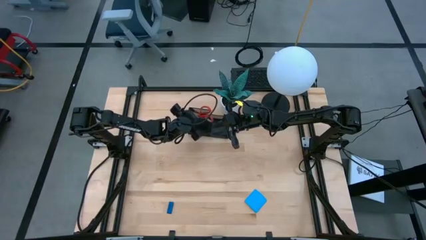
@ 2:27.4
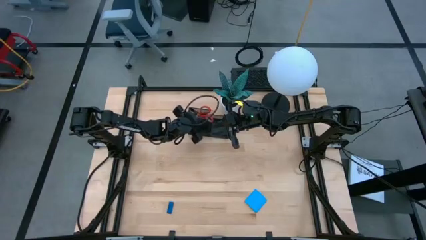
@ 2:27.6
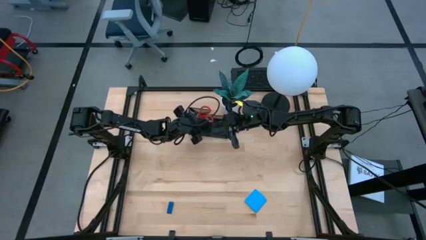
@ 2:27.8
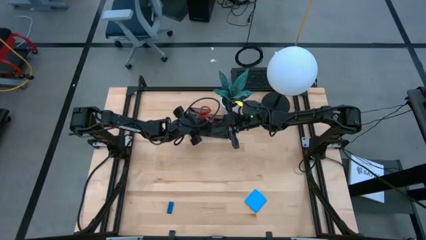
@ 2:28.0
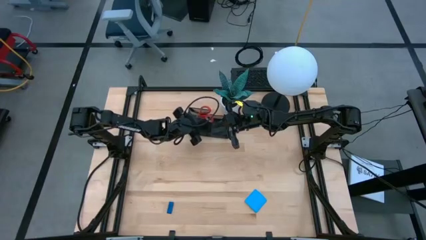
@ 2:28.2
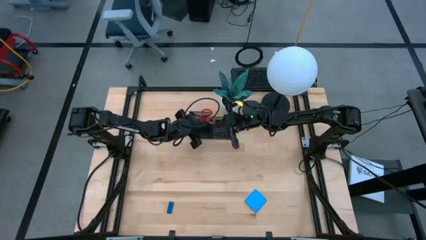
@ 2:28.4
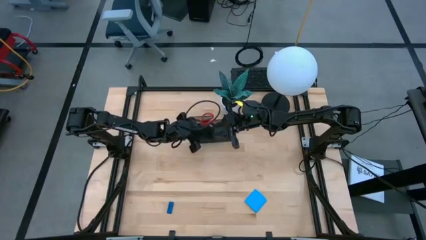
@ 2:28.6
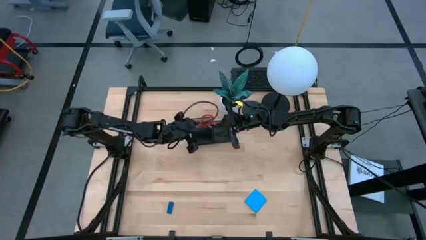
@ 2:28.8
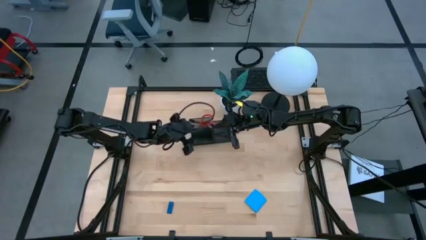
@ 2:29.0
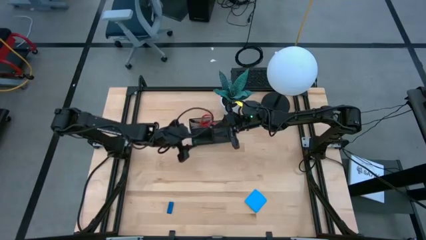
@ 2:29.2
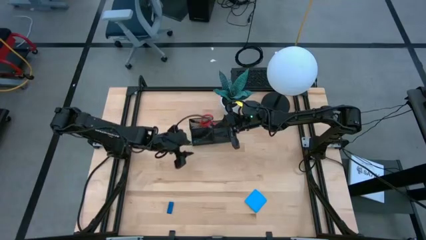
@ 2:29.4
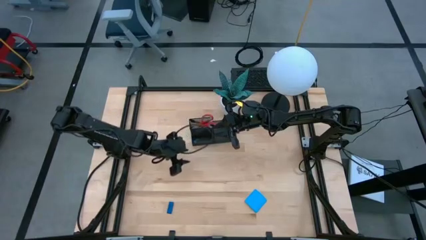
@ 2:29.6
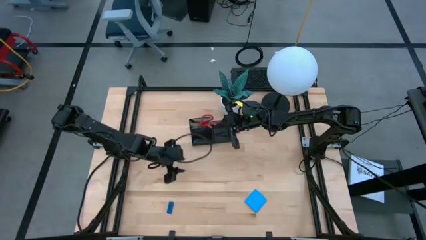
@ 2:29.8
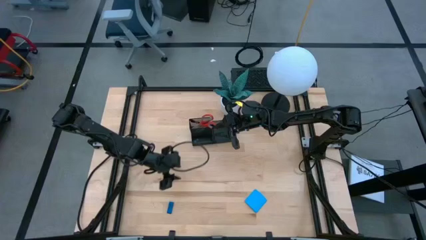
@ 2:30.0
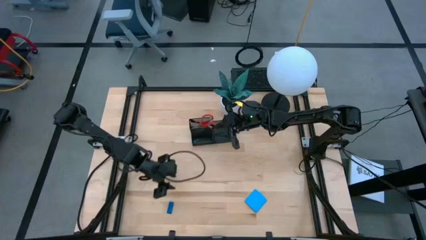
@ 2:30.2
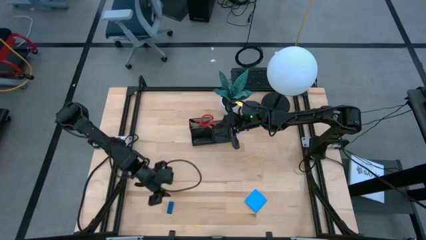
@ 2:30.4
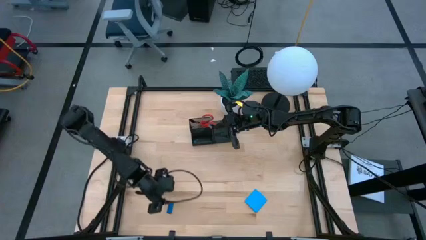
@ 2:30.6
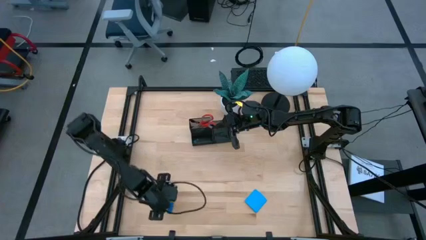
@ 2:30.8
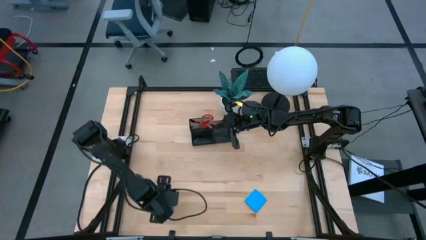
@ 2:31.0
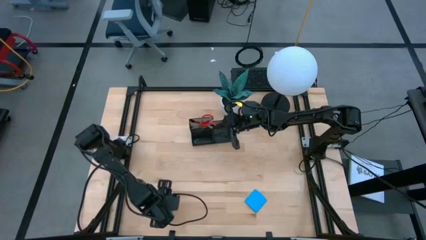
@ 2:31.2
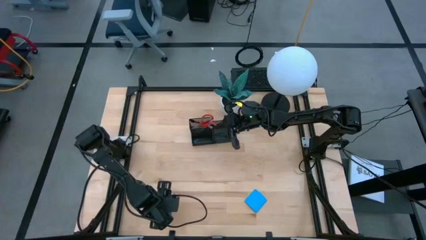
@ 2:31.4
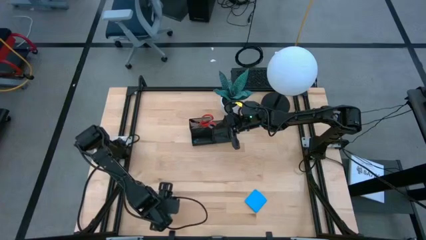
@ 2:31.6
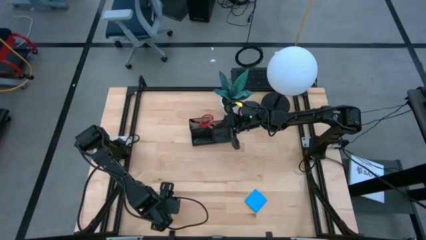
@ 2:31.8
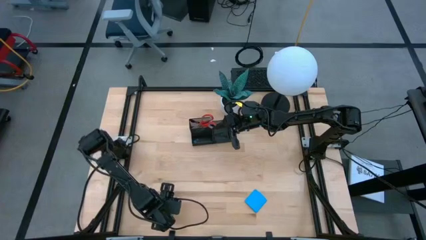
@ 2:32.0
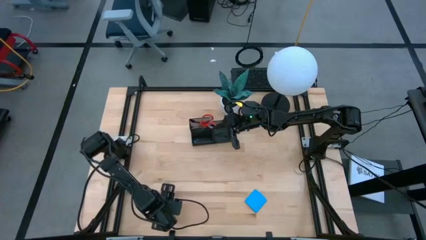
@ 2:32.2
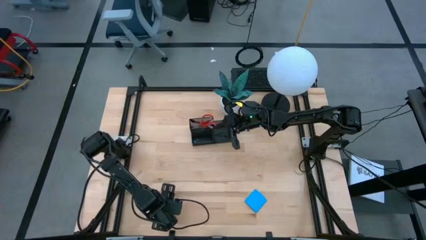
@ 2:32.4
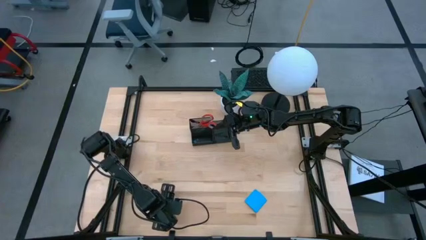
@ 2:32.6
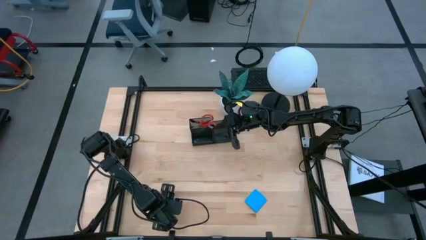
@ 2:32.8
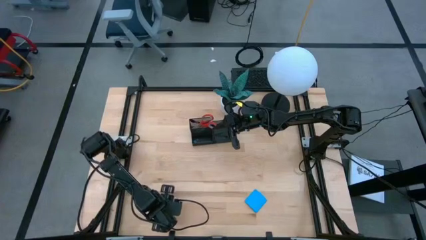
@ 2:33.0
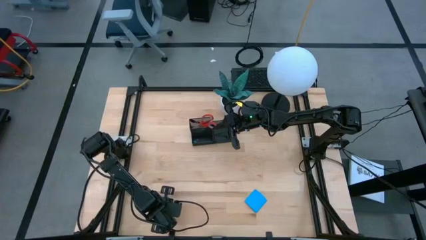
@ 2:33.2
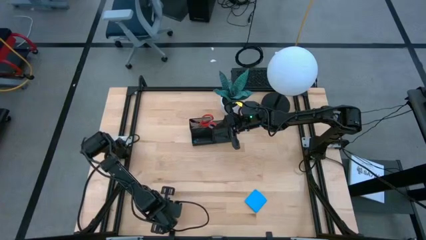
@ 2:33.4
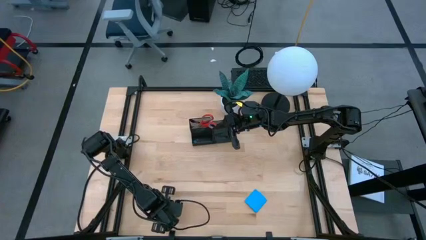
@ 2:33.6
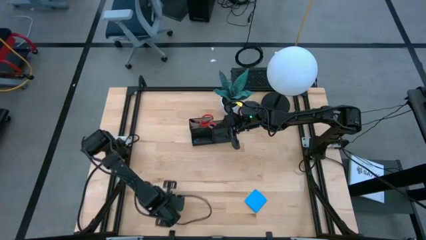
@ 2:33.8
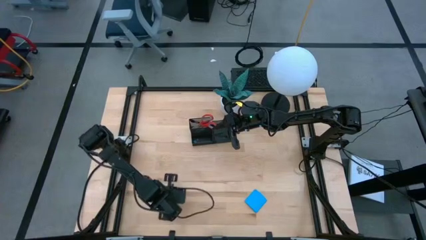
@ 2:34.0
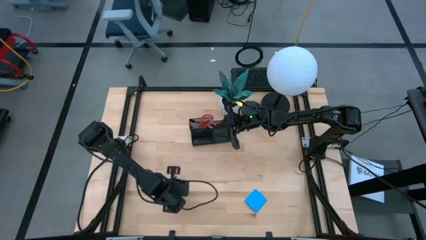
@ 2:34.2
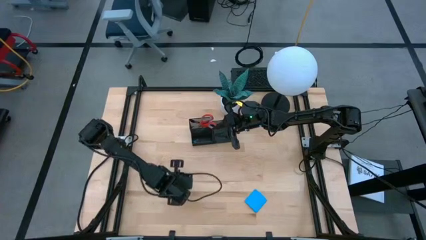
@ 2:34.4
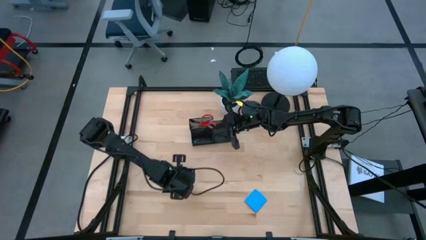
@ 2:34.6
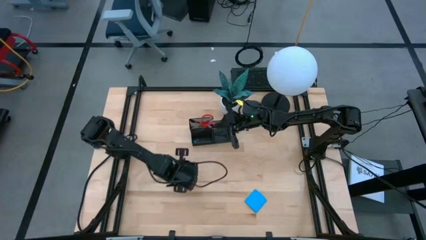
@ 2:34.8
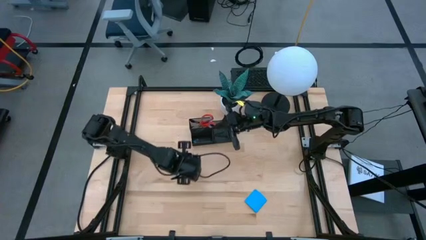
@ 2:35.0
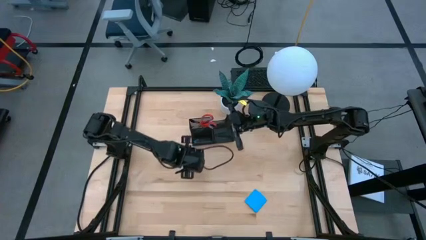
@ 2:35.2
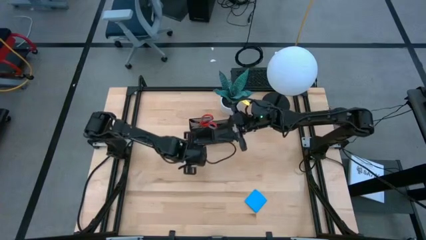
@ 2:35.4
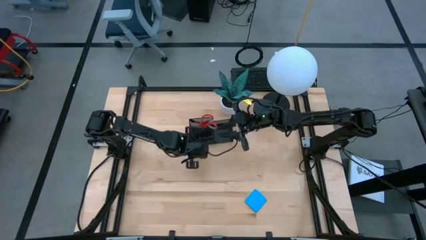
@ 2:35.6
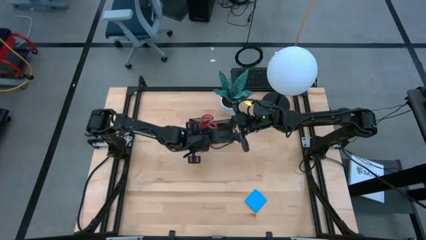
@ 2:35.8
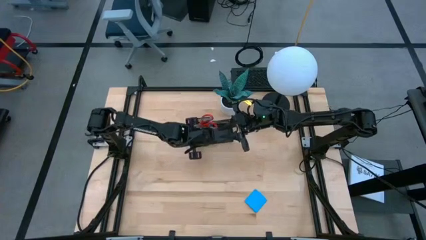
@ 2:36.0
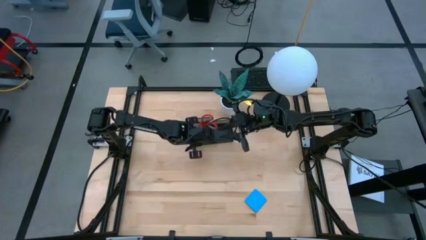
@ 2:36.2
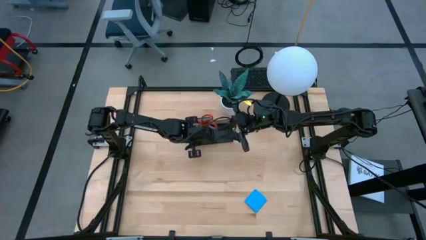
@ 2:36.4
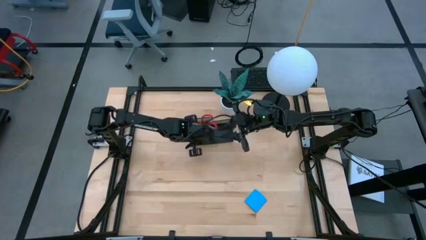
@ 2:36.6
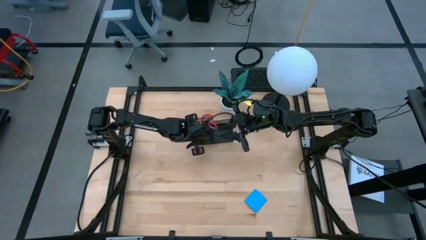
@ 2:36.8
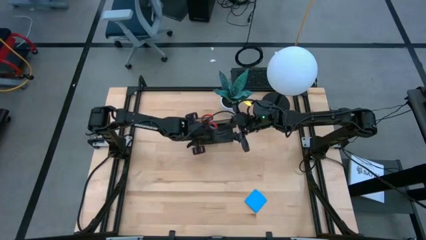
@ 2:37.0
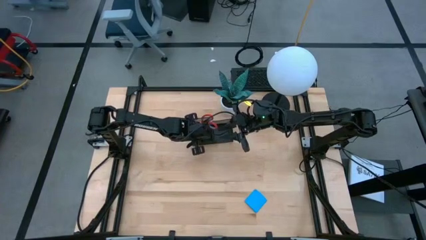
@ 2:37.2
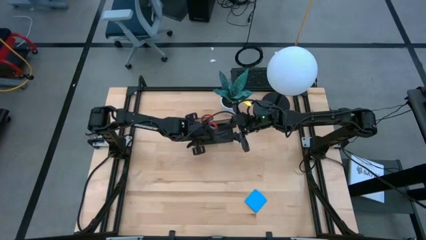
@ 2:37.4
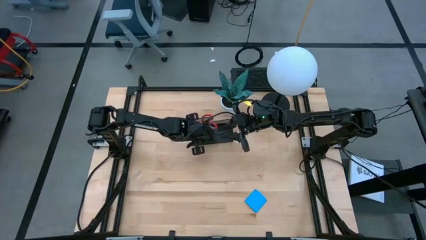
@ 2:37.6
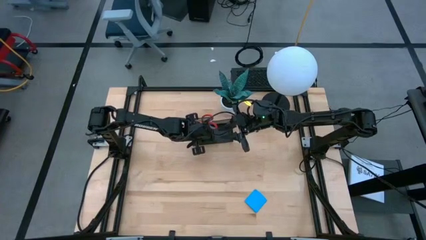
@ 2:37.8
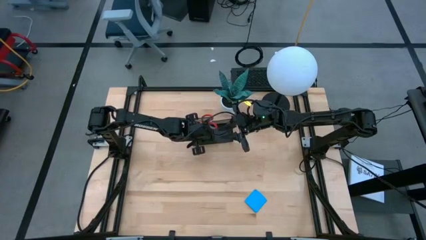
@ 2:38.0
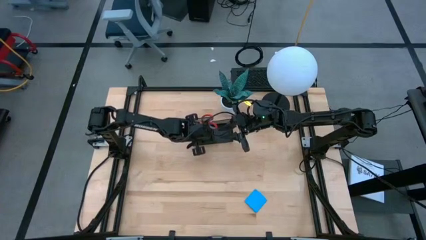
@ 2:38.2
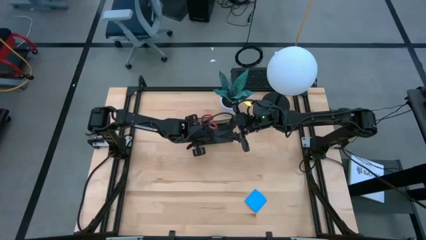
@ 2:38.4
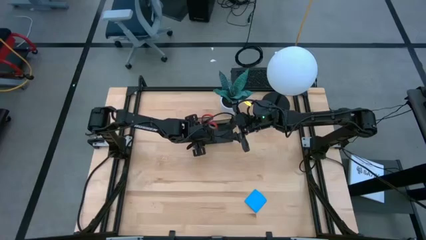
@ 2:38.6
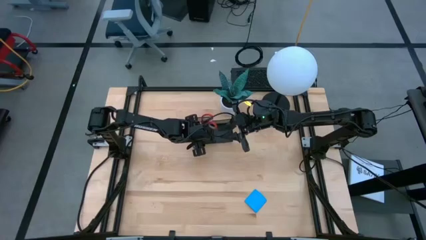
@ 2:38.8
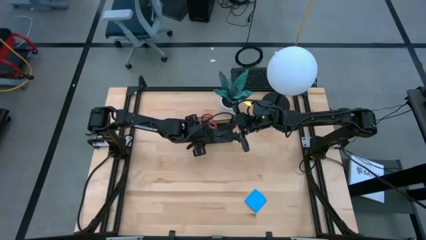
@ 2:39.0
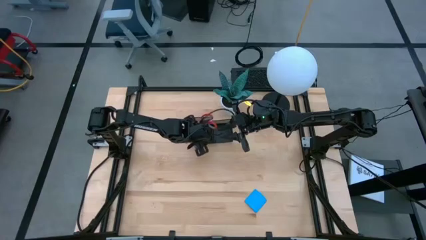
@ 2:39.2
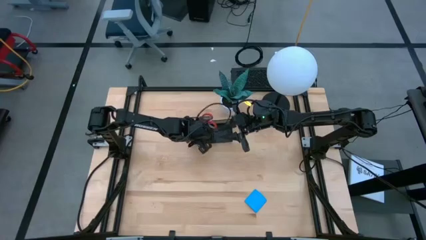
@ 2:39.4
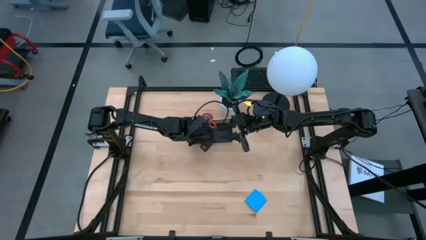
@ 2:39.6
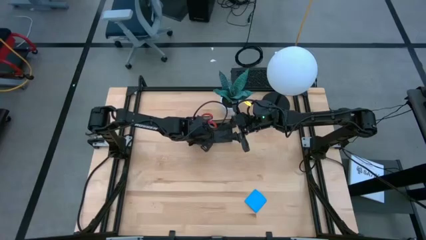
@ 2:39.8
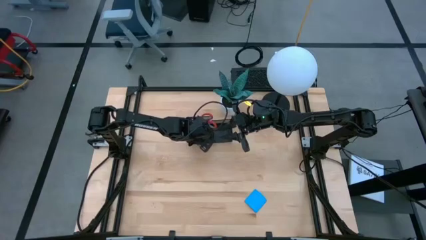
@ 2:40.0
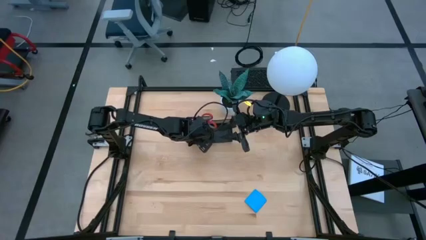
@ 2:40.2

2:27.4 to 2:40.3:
Task: Pick and place office supplies into organizer
Put the blue eraser into the black desk organizer
